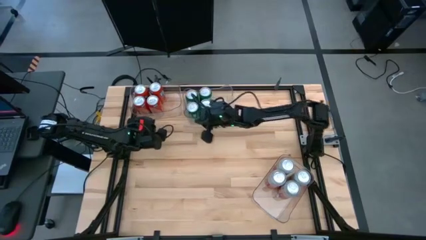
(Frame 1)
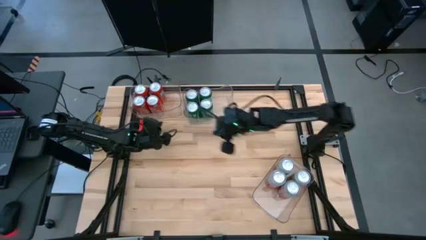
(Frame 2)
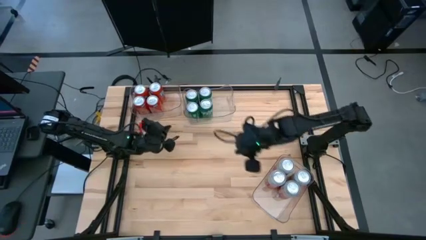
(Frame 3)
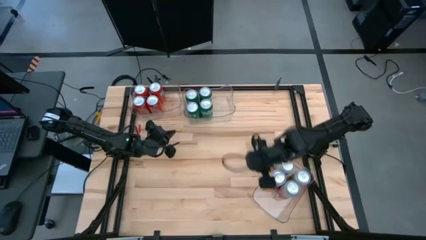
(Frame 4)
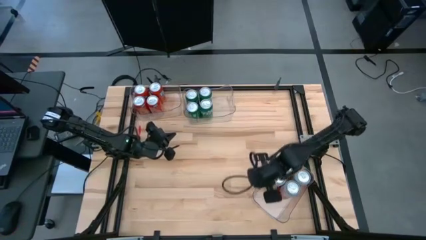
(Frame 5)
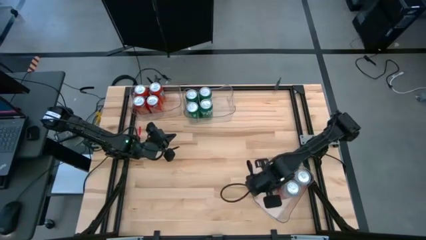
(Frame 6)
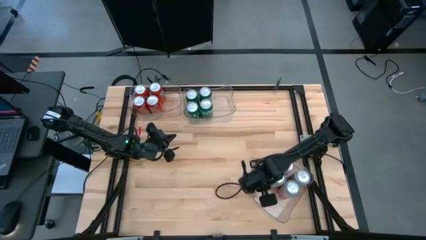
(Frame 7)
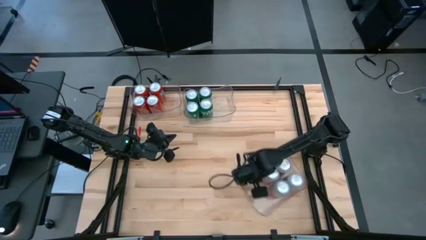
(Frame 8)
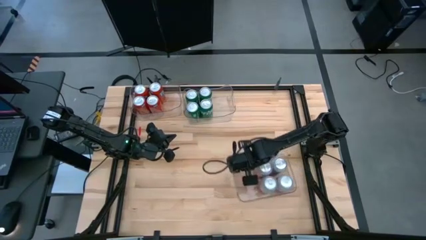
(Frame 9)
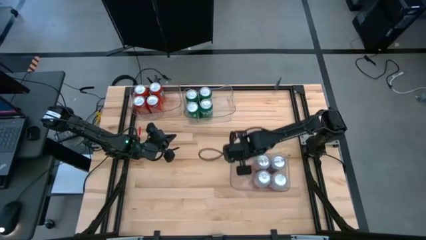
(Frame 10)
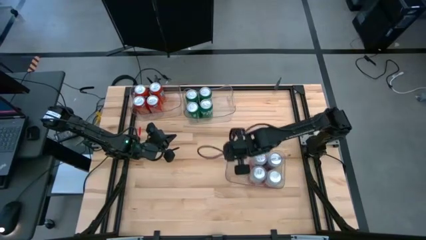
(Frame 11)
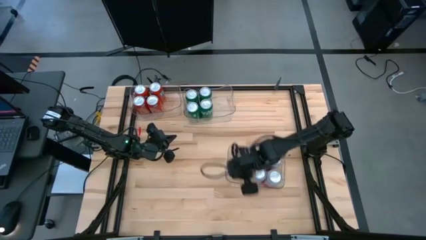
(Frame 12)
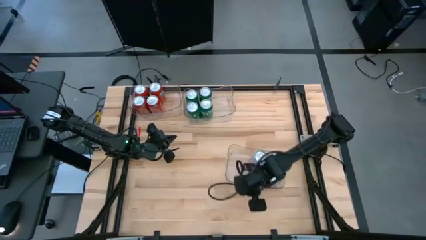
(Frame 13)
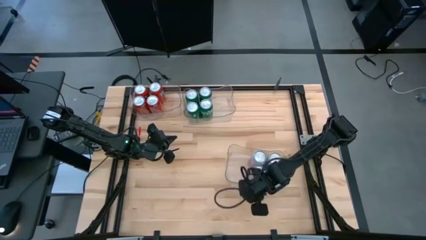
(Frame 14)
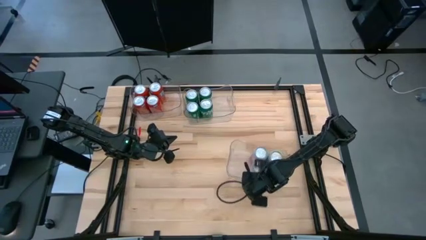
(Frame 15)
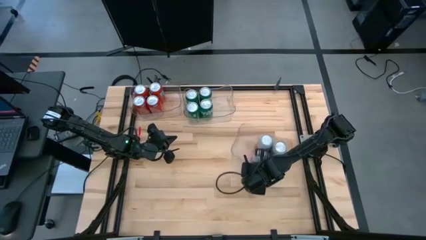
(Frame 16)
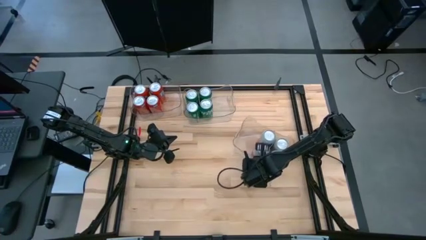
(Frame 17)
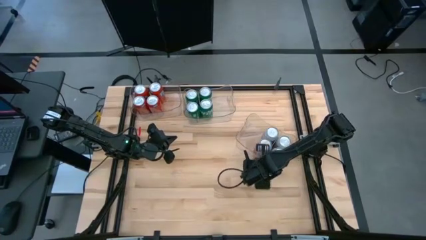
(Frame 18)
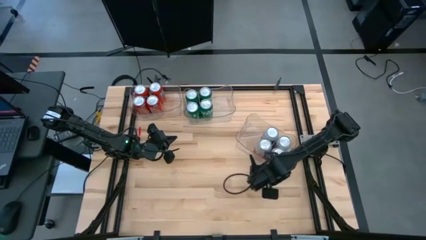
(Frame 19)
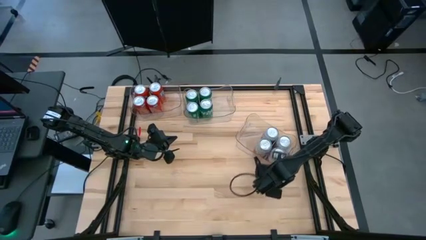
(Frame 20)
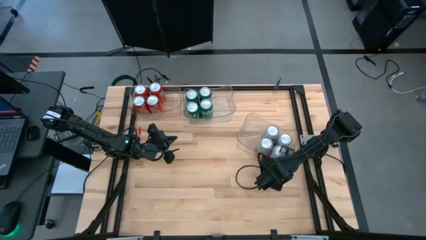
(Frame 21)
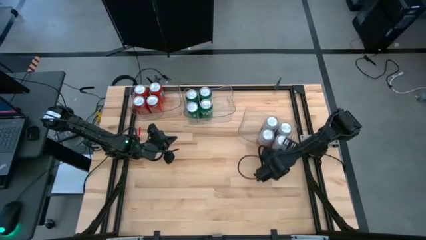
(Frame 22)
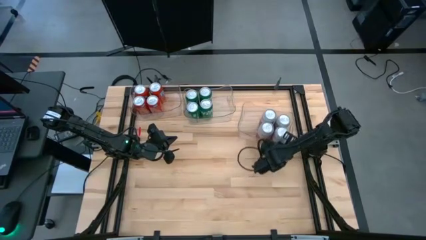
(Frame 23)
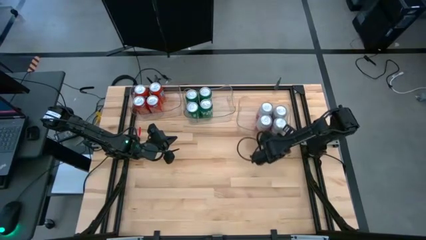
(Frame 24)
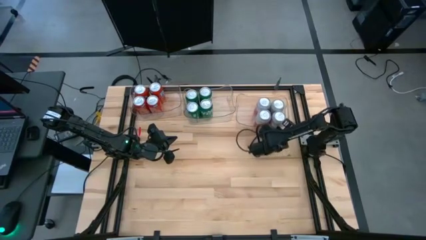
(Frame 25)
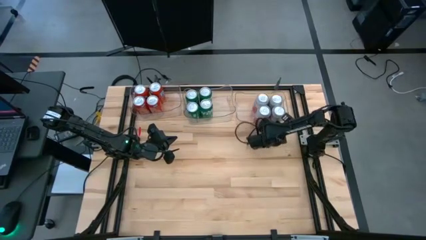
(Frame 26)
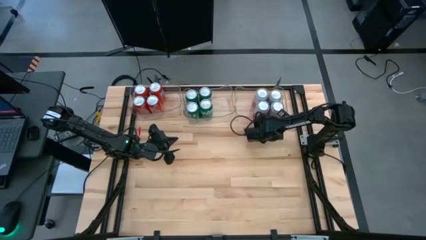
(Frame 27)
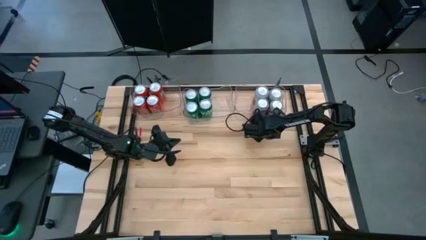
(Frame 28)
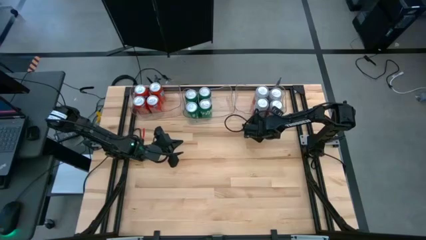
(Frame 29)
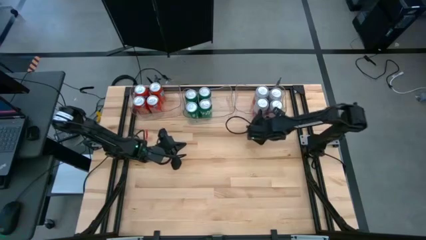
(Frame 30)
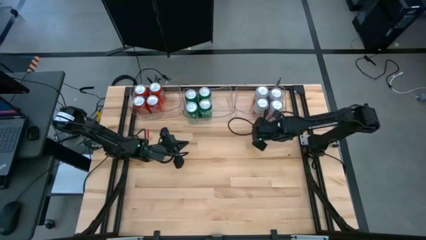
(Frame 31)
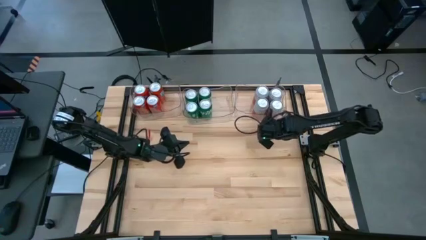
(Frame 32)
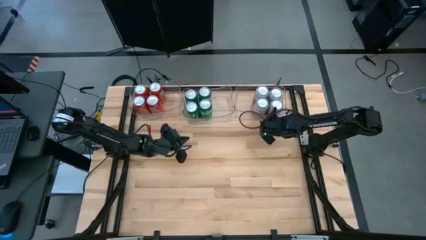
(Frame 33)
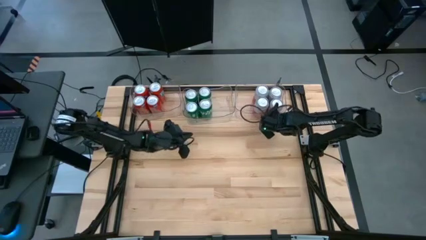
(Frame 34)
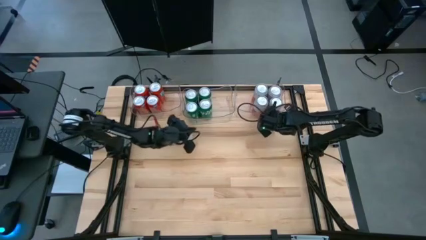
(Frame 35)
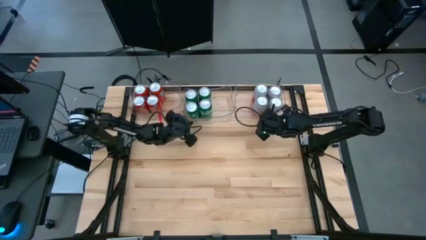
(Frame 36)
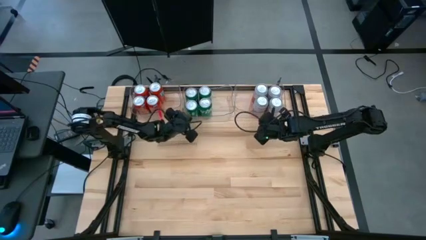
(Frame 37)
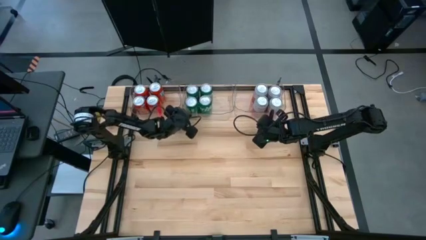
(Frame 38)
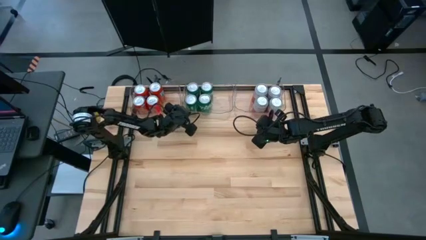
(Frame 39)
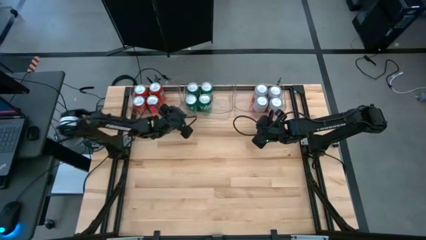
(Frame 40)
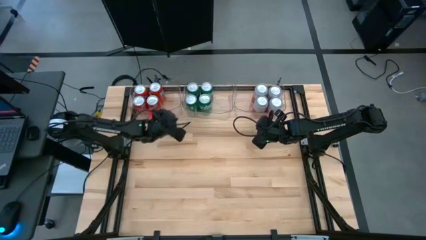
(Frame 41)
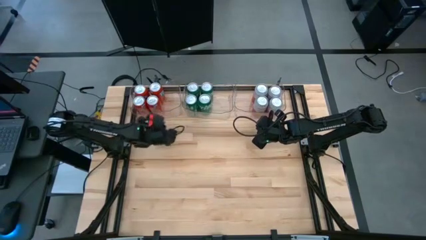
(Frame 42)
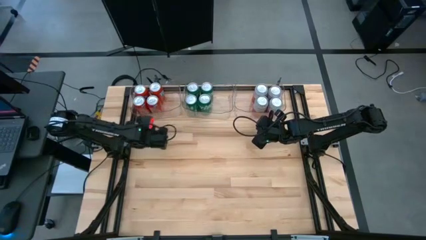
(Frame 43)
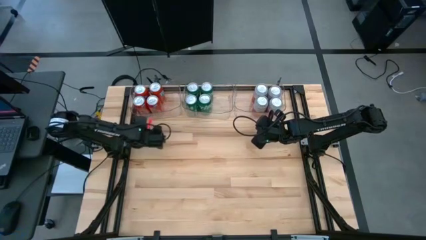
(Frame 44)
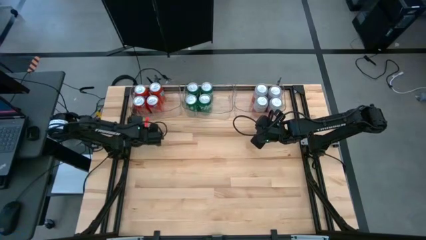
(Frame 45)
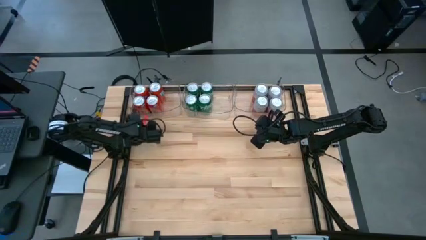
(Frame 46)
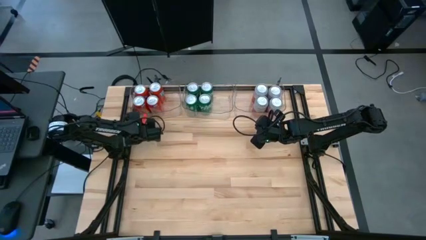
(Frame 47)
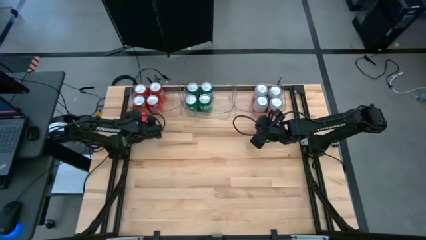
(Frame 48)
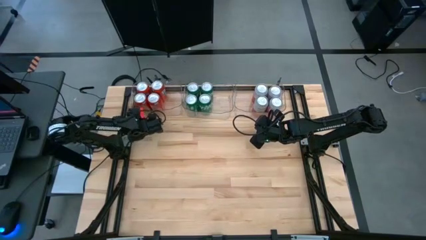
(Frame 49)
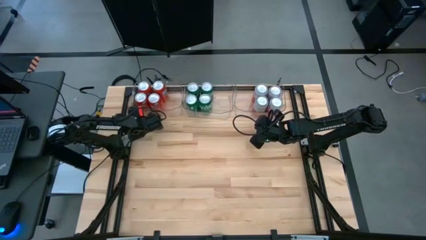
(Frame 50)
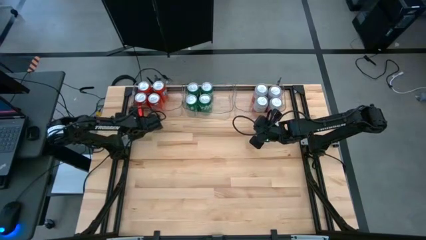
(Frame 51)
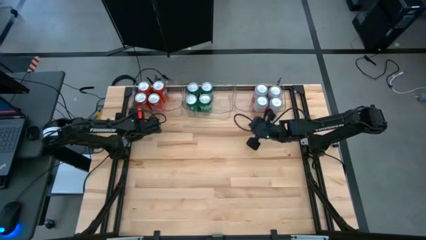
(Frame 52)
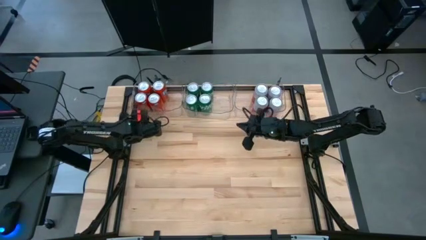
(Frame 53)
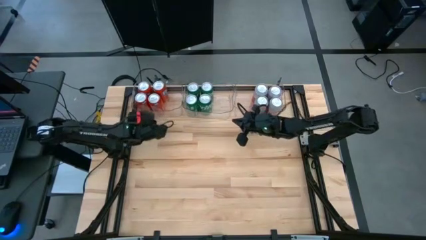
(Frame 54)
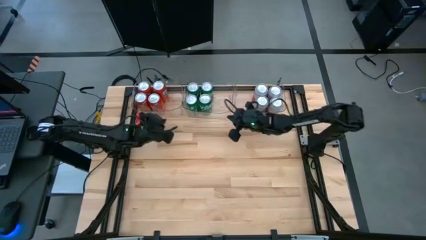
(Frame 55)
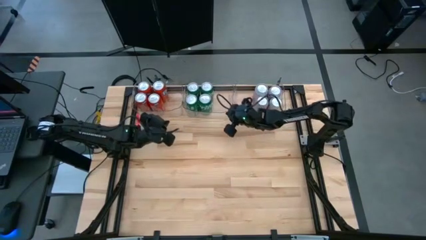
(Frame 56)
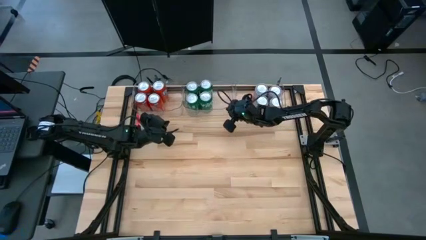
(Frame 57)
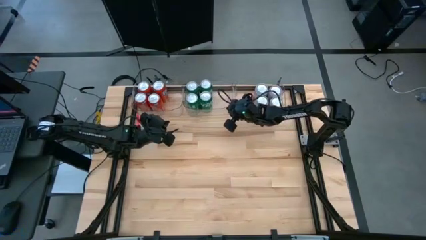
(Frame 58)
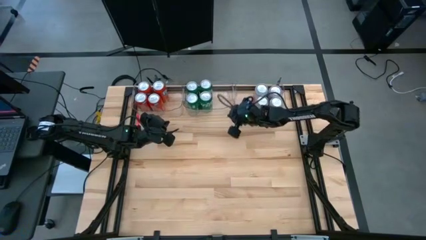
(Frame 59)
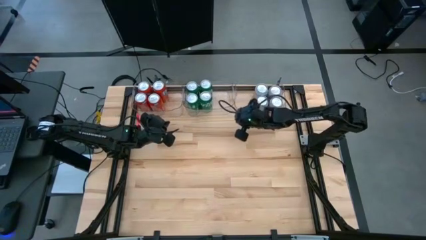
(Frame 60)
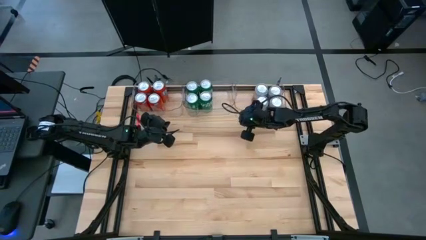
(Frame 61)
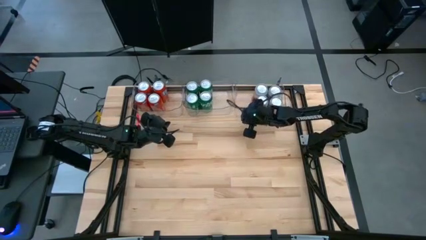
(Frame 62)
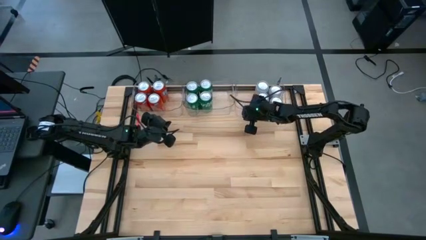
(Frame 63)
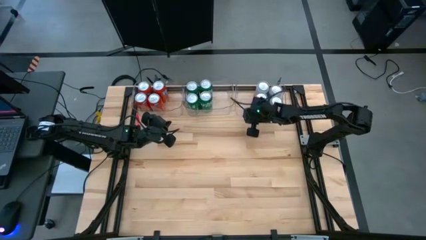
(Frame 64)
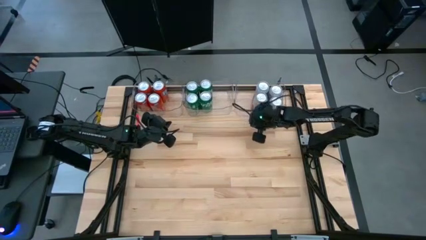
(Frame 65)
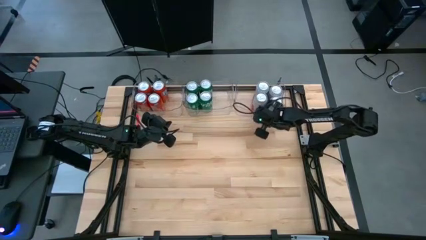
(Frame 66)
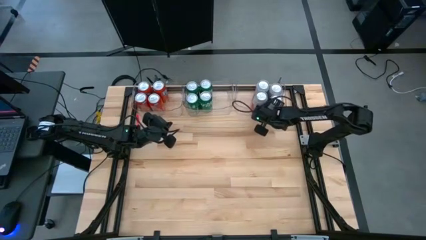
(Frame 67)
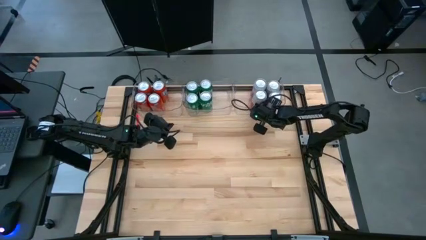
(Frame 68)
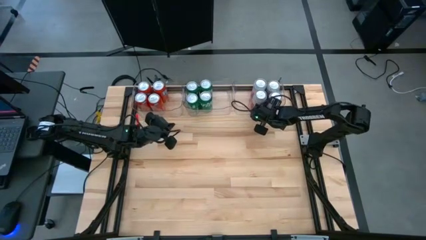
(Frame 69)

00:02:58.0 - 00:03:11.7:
Task: Sort soda cans
Move the transparent bin with sorted pink/white soda cans to the top right
